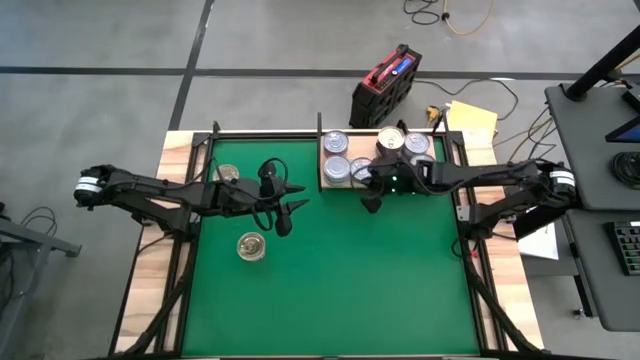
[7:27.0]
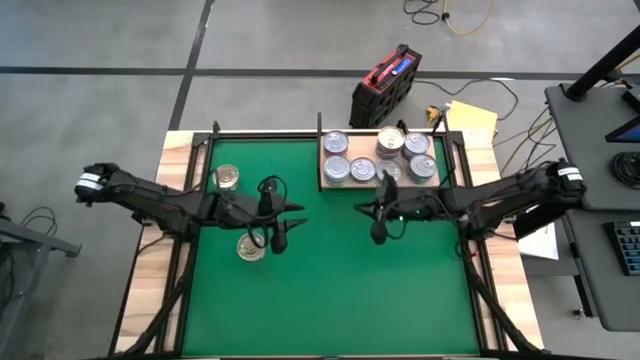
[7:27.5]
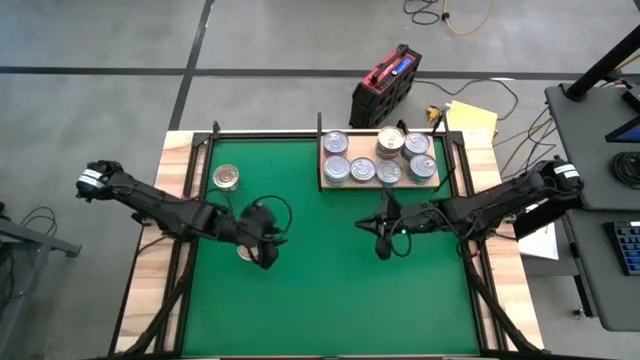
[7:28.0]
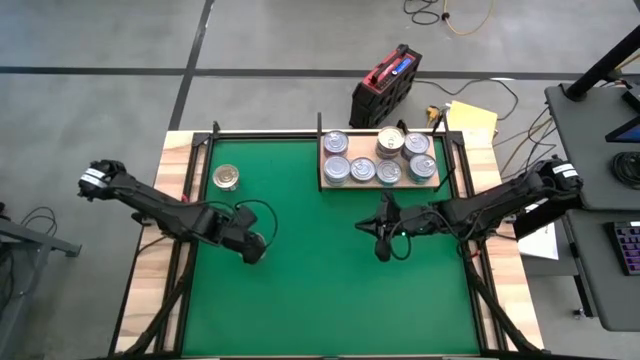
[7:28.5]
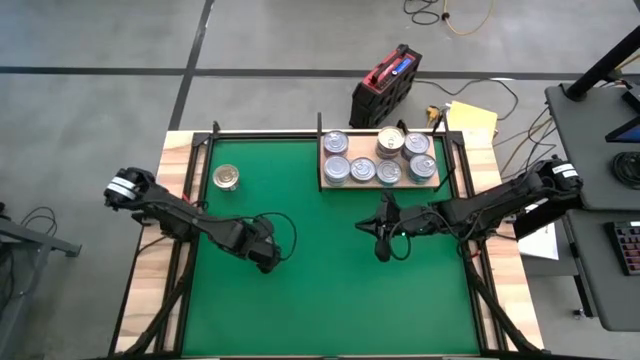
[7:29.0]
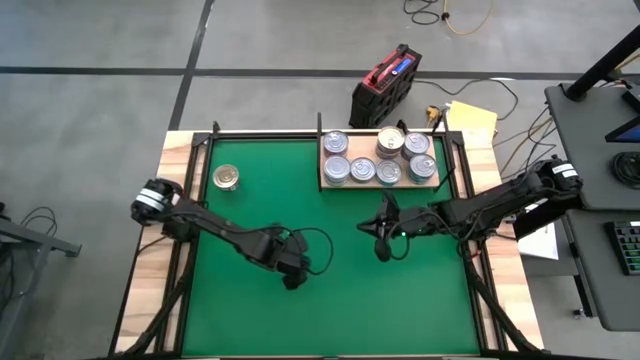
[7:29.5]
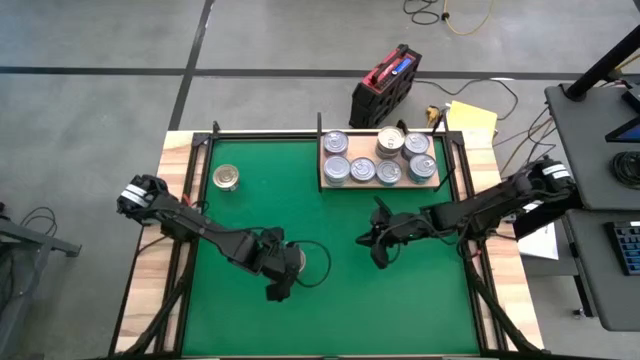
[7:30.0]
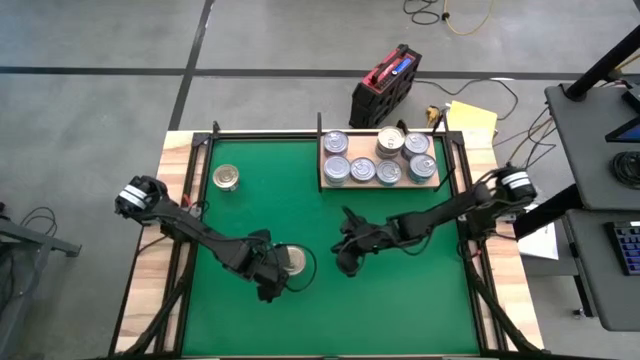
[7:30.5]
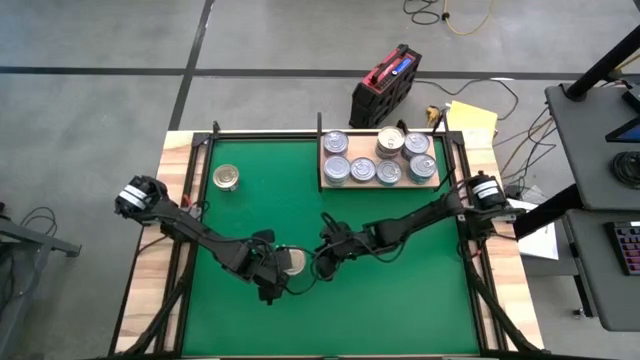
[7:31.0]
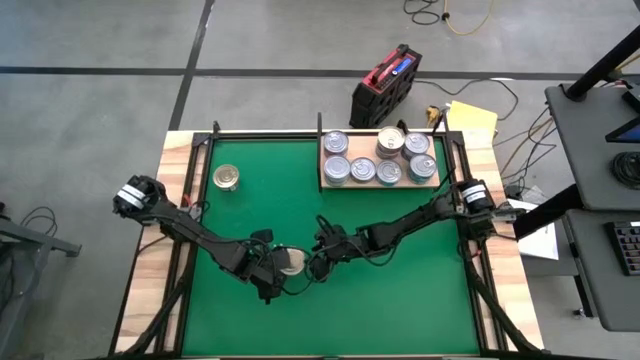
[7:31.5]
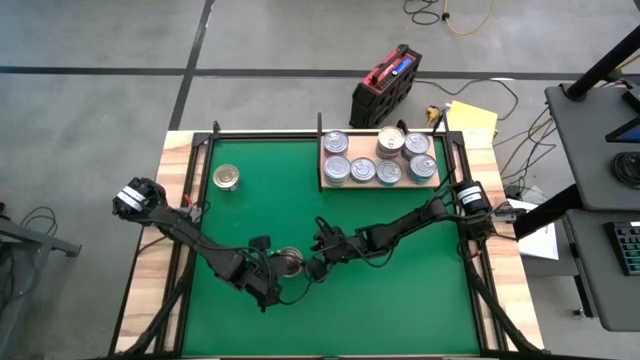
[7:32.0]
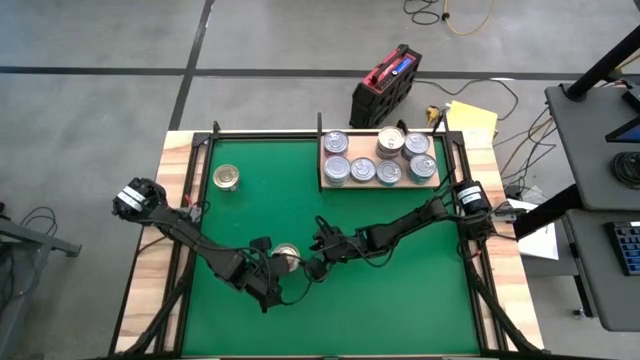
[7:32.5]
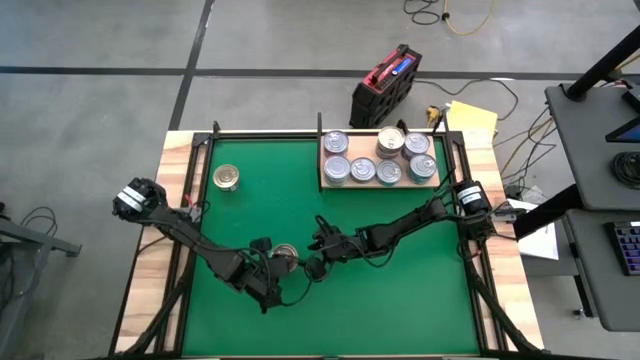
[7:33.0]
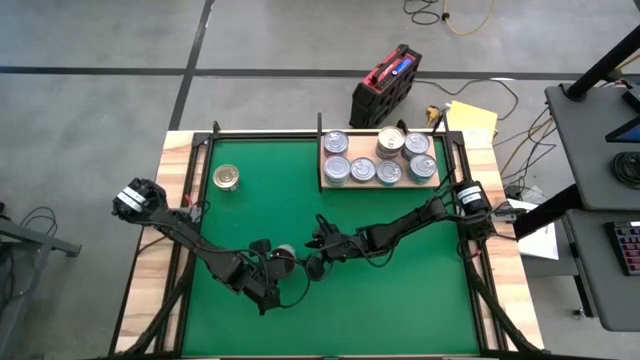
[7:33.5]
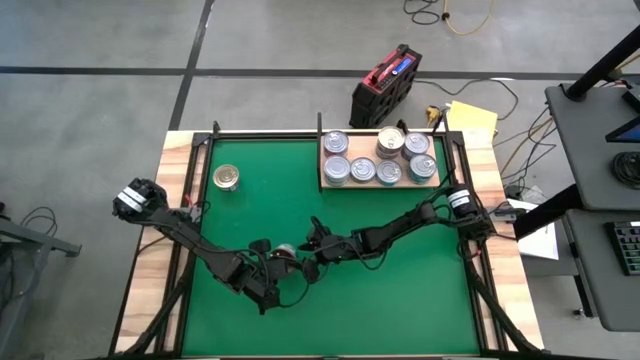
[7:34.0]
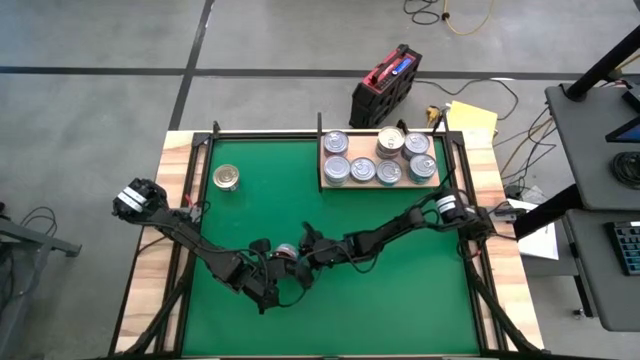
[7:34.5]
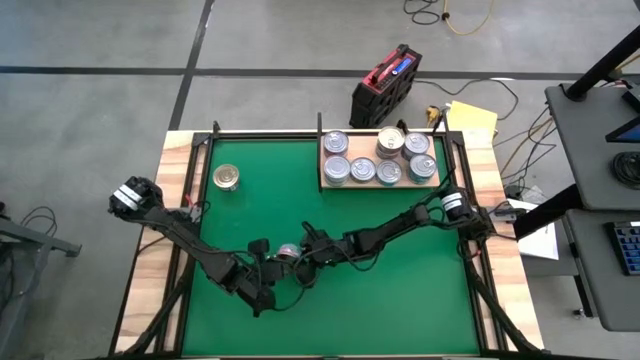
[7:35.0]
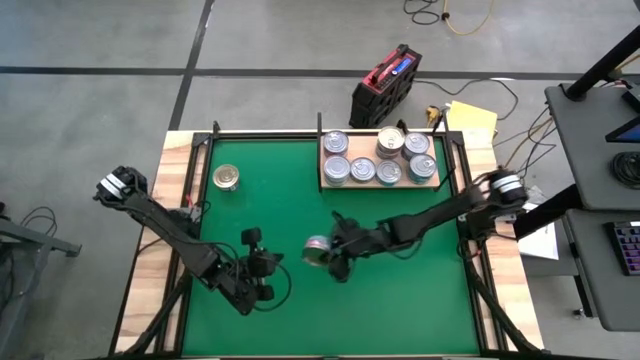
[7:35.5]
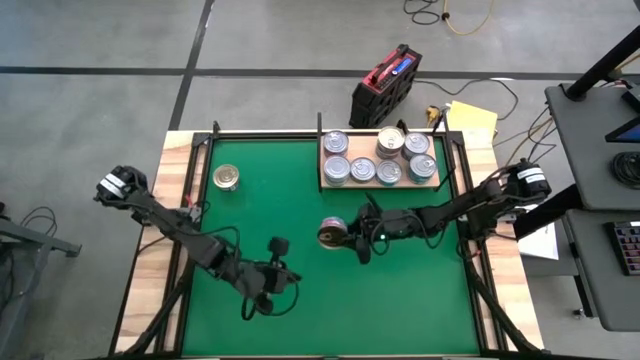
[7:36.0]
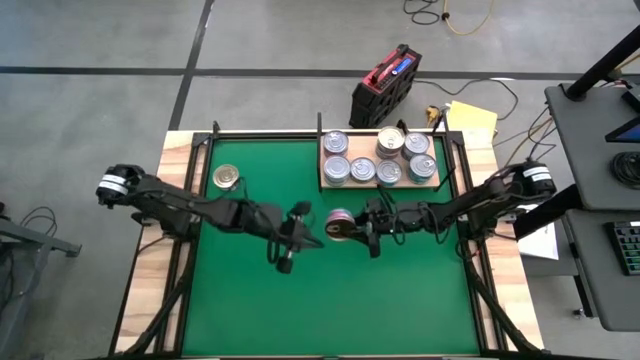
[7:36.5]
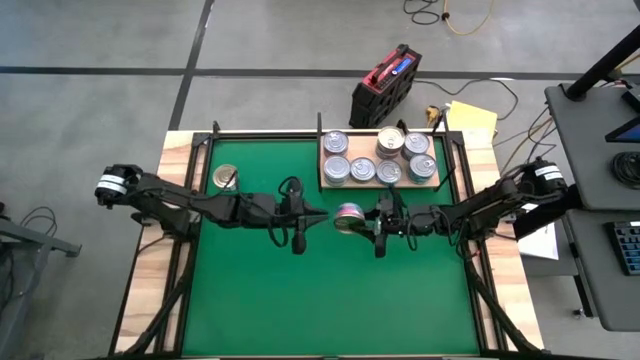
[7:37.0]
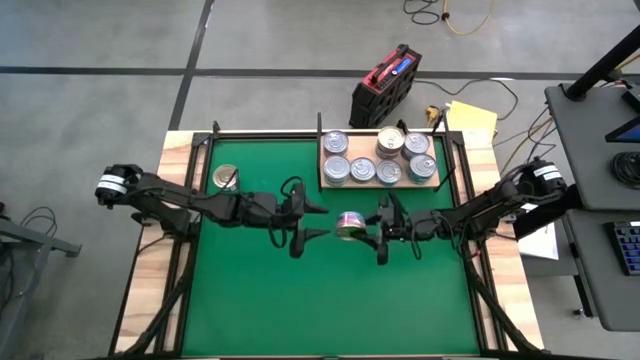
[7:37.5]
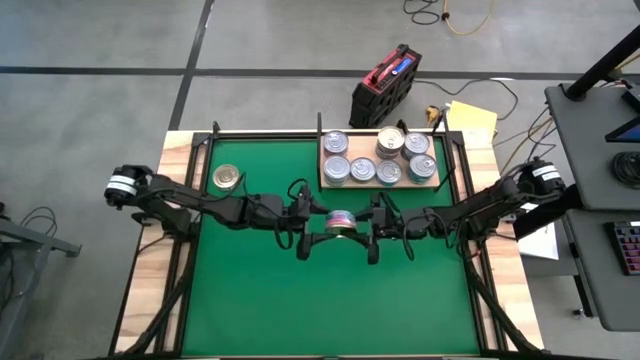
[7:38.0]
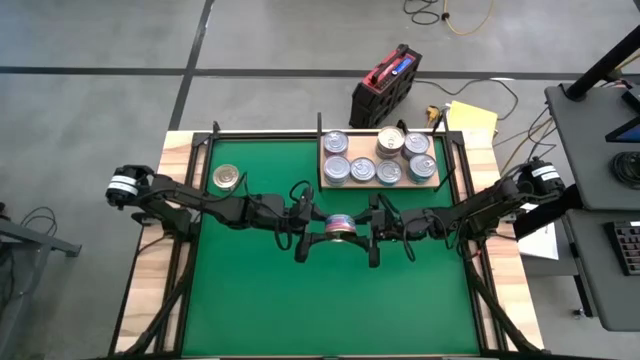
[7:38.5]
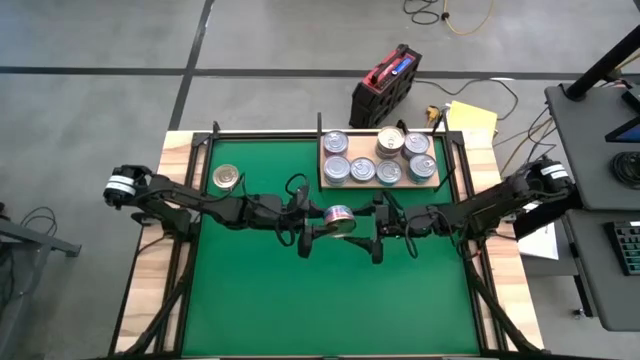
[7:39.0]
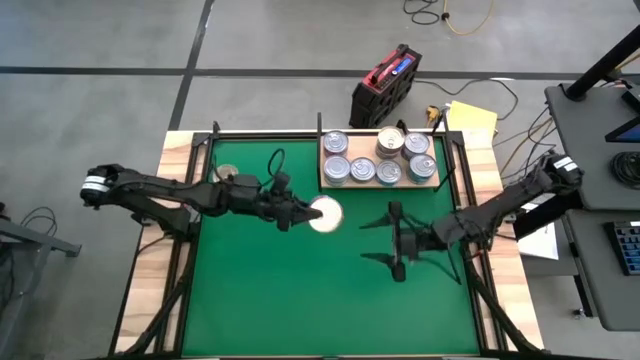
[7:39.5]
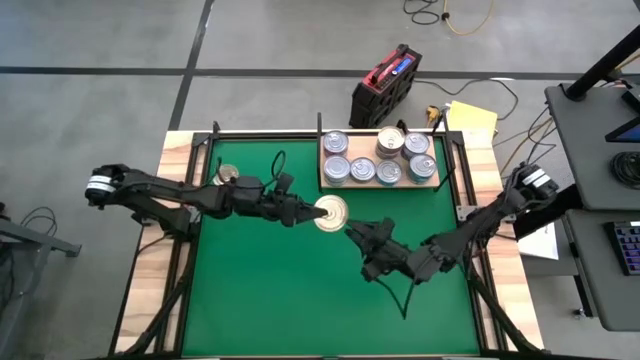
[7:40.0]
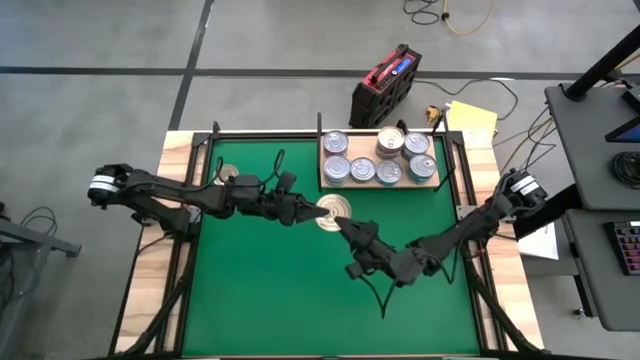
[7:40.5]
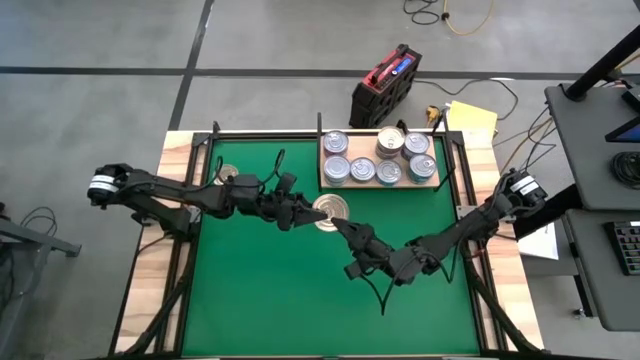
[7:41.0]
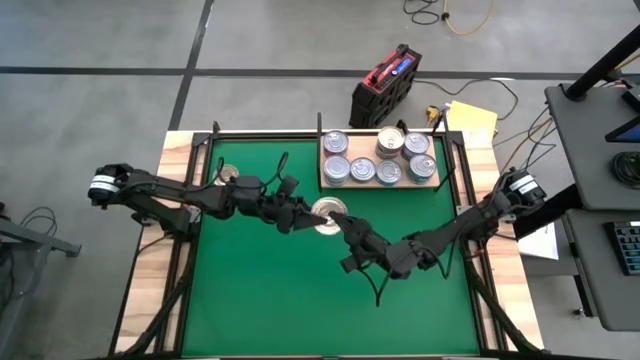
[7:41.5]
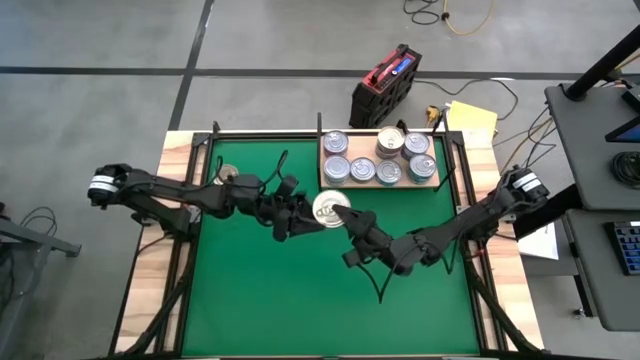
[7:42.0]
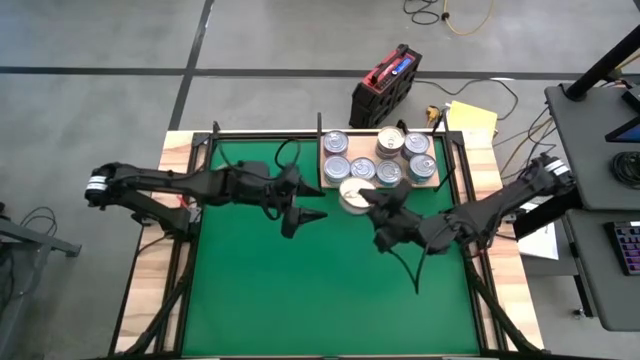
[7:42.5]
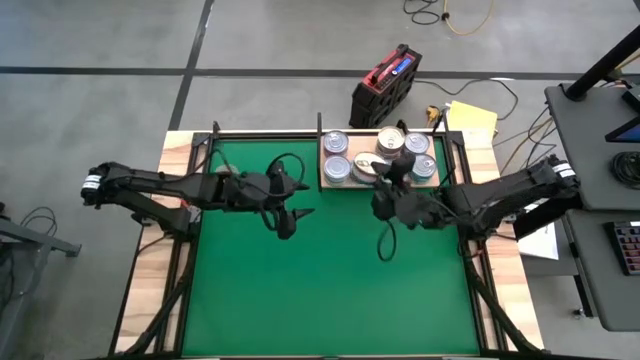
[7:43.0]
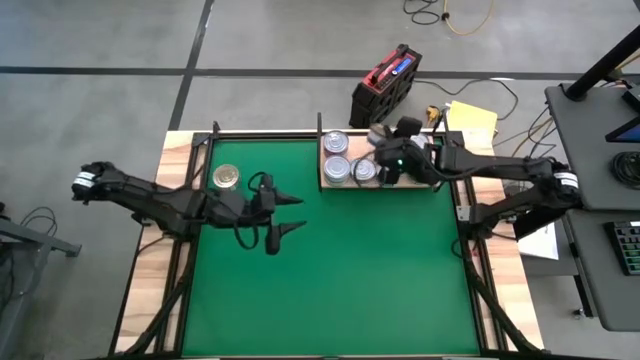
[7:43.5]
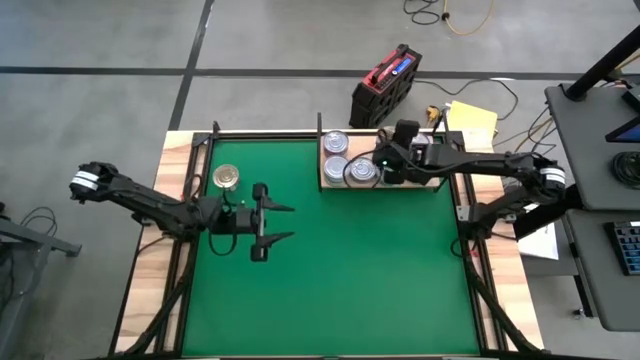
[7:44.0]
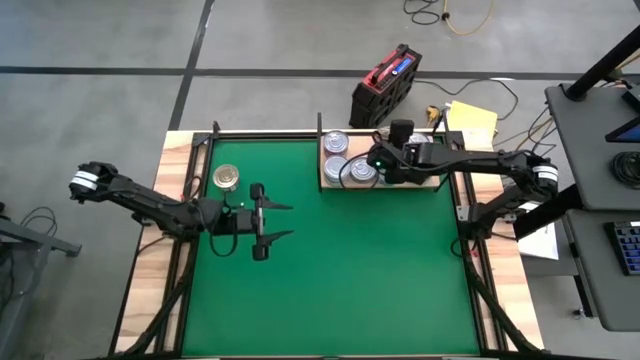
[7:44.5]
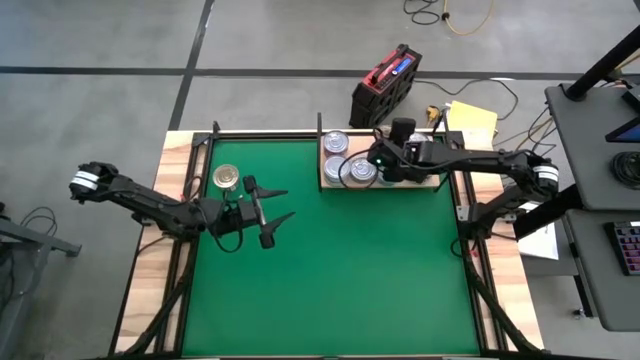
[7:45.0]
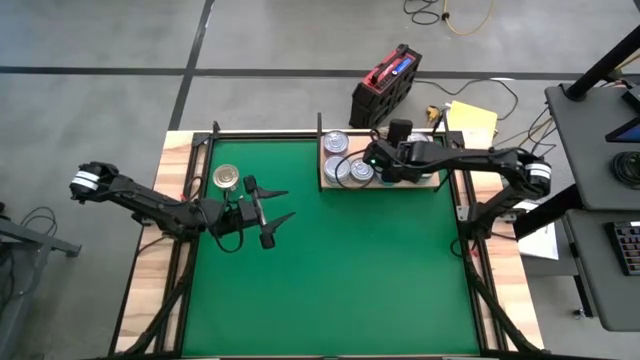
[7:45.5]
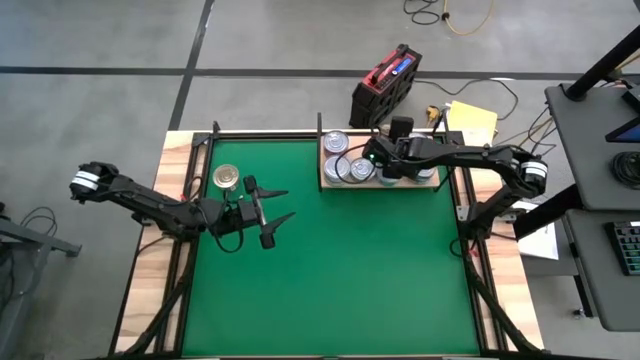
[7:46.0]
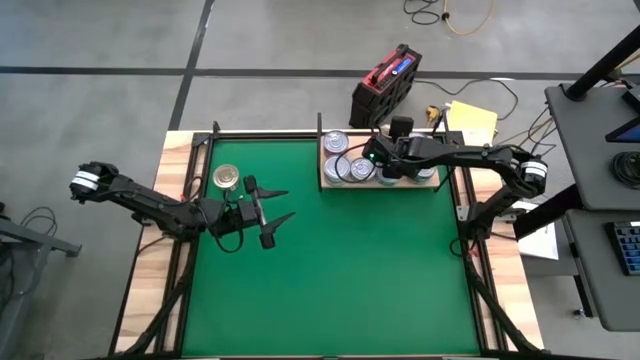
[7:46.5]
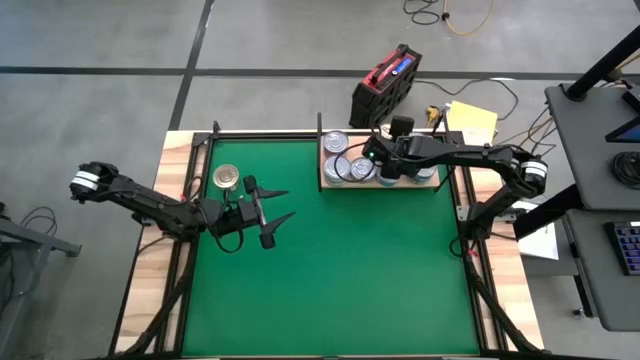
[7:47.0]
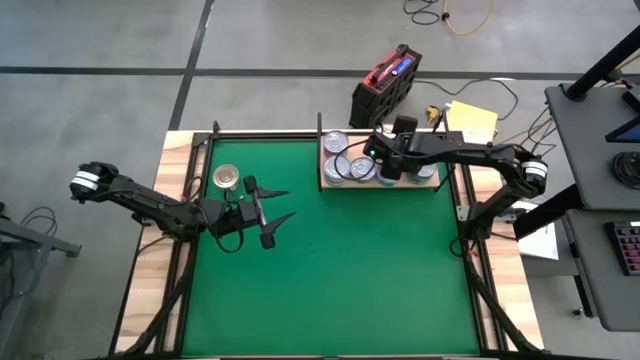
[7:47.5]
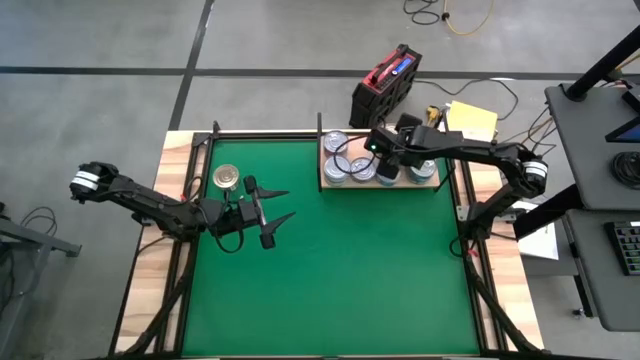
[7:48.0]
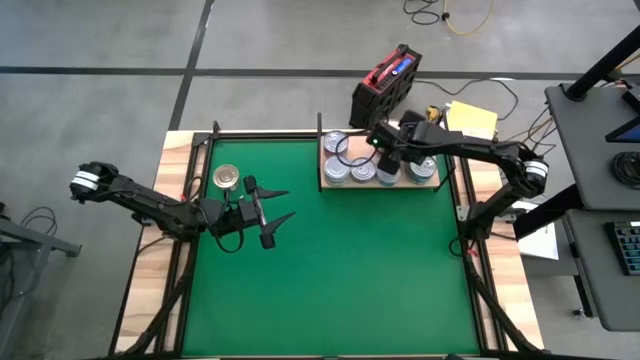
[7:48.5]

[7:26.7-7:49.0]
Task: Stack canned seafood by type on shelf
Stack the blue/pink tuna can on top of the blue/pink tuna can on the shelf
